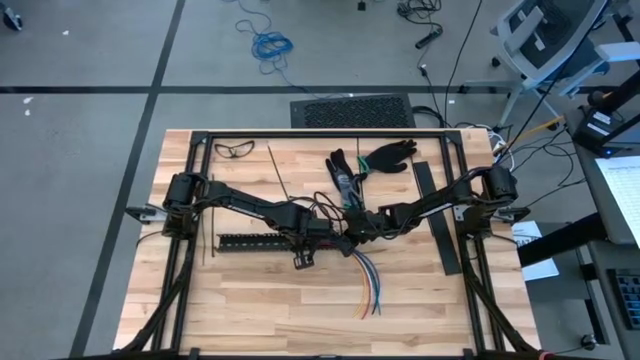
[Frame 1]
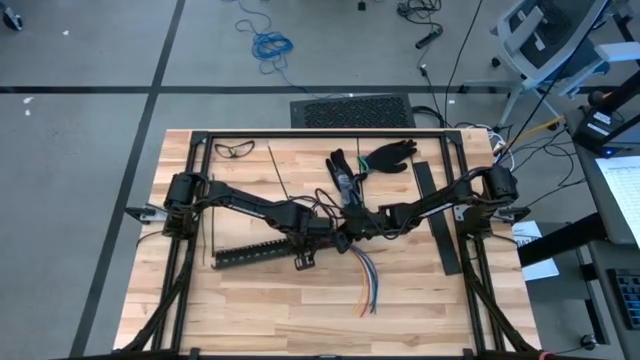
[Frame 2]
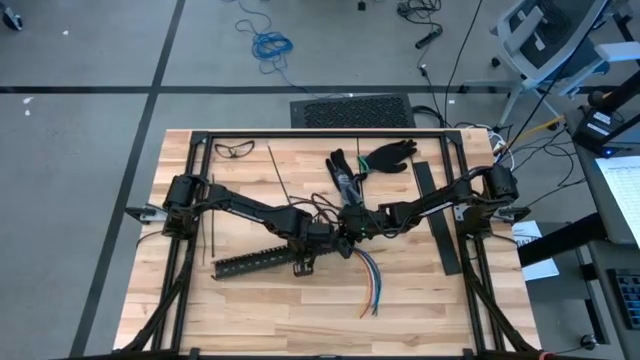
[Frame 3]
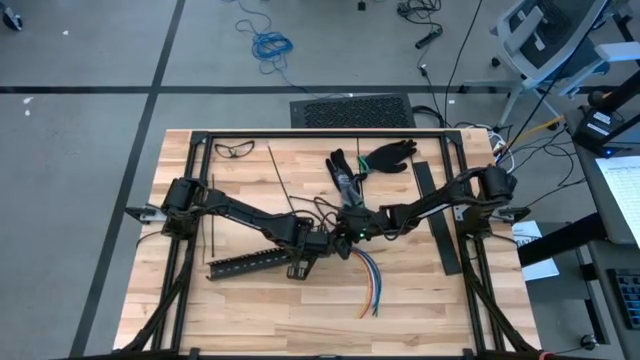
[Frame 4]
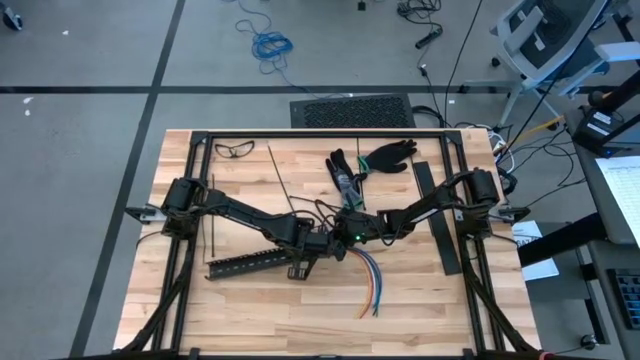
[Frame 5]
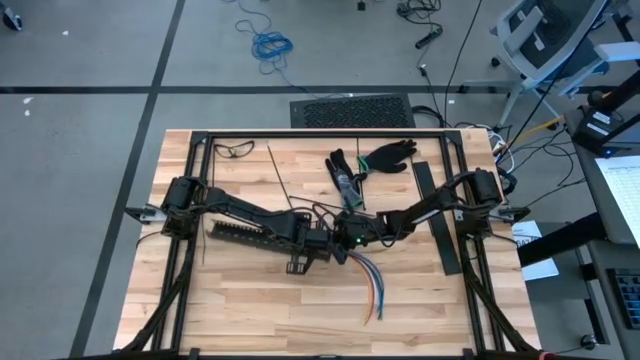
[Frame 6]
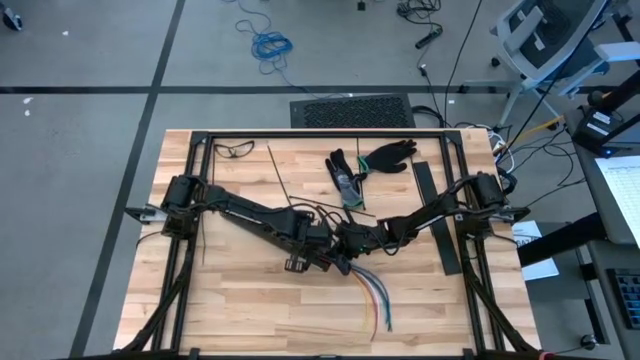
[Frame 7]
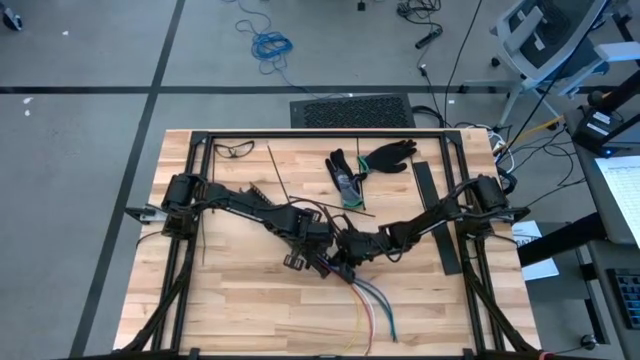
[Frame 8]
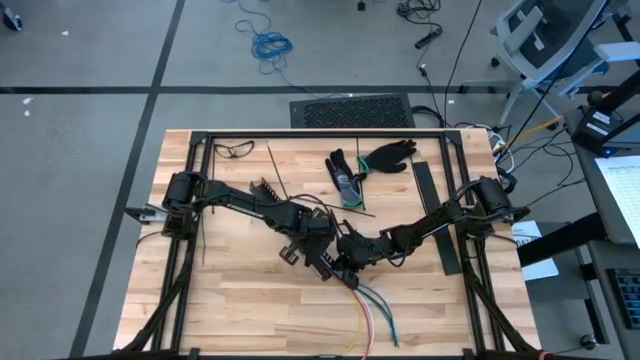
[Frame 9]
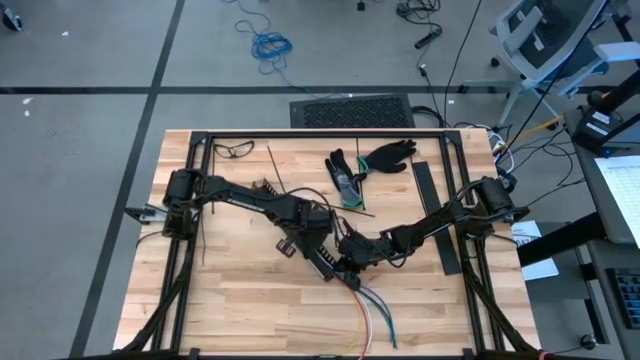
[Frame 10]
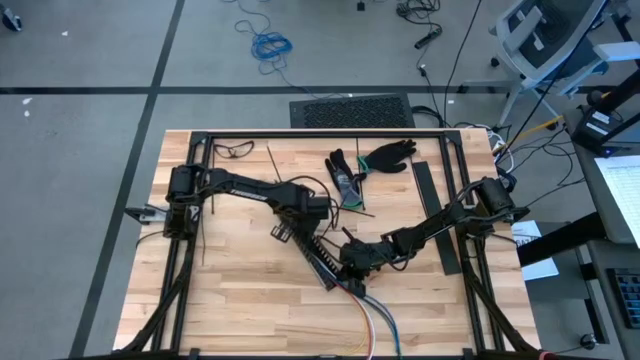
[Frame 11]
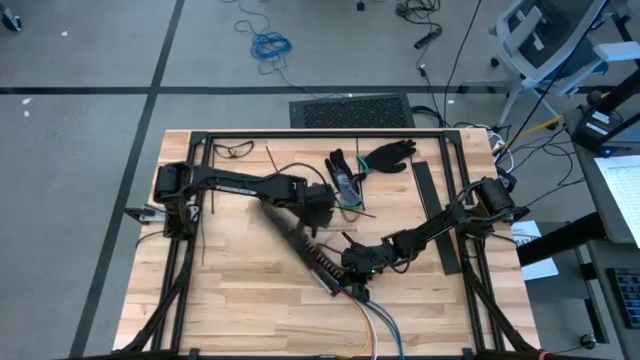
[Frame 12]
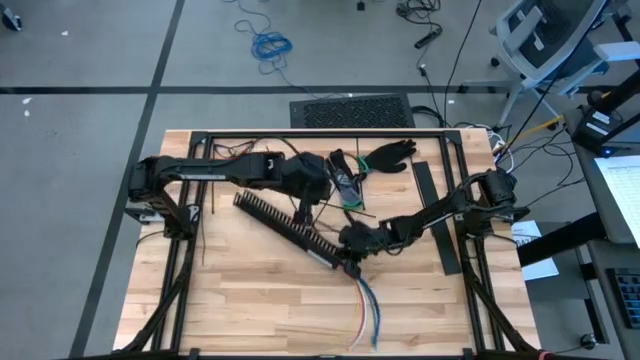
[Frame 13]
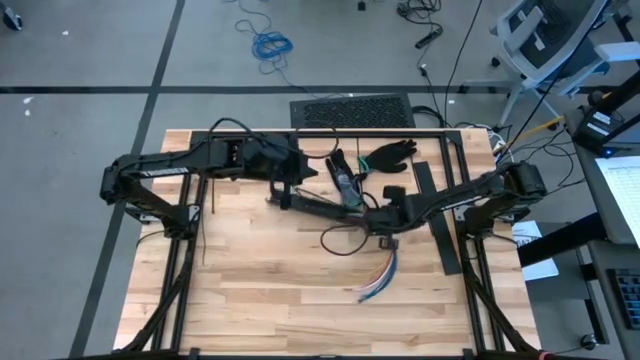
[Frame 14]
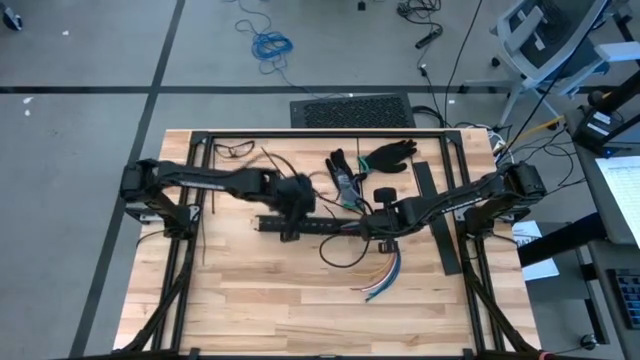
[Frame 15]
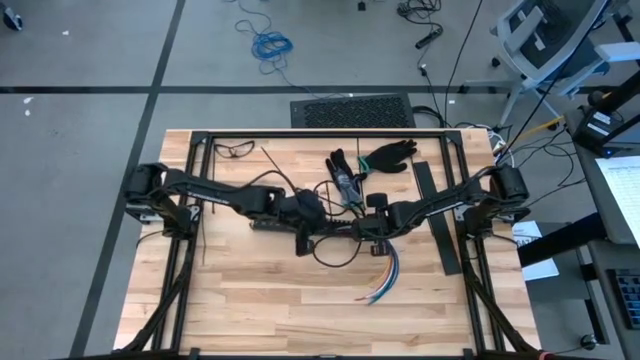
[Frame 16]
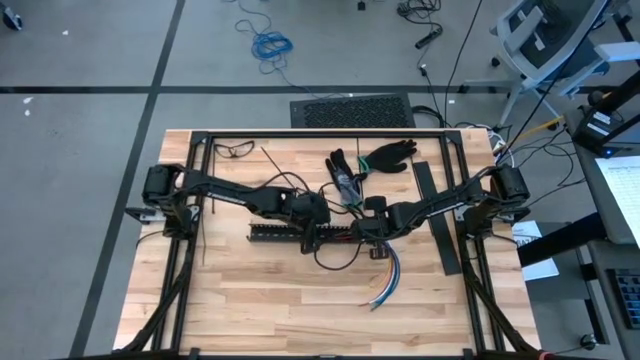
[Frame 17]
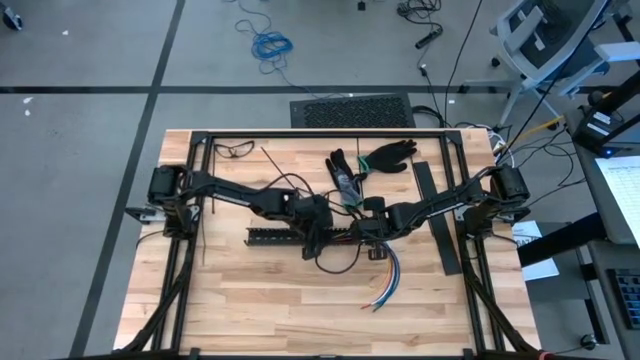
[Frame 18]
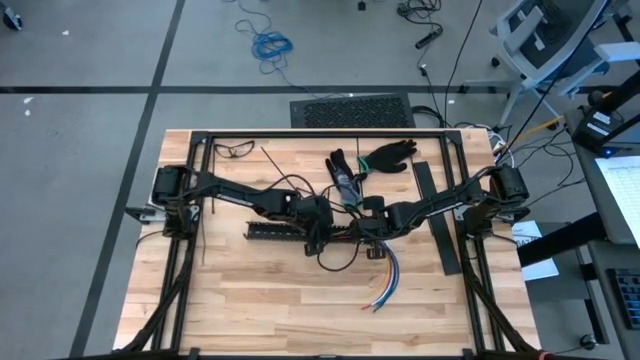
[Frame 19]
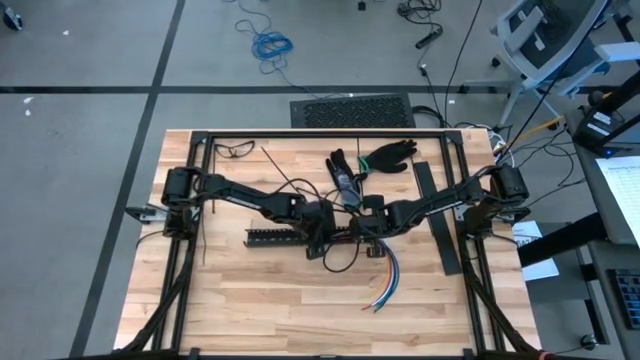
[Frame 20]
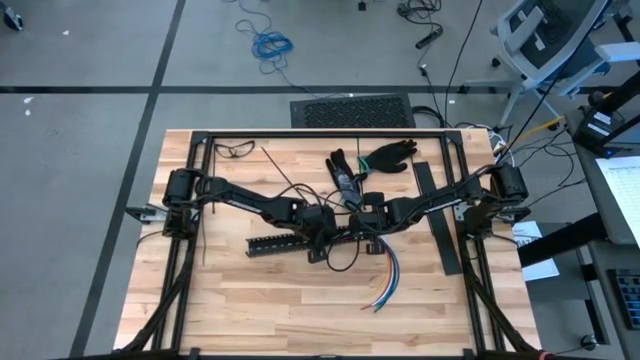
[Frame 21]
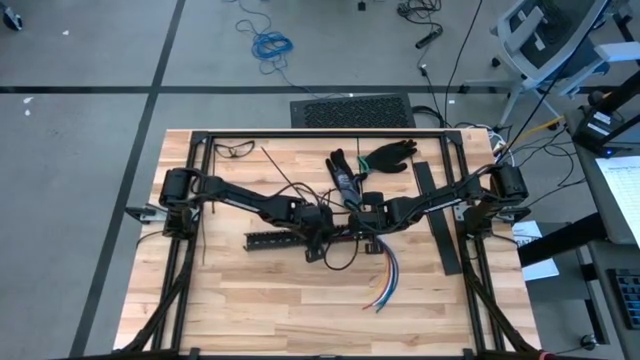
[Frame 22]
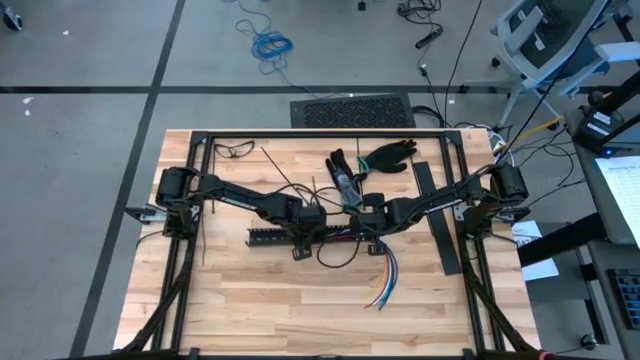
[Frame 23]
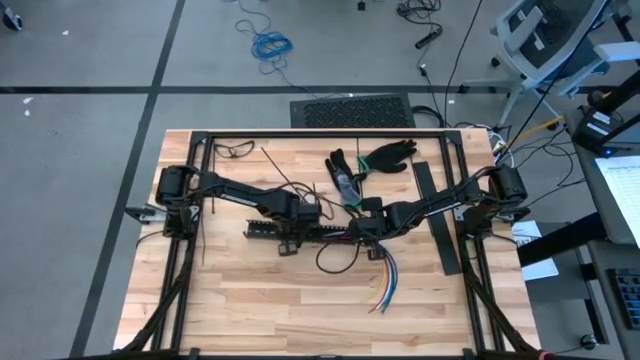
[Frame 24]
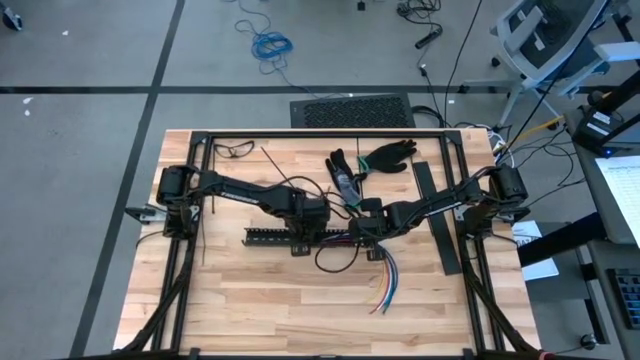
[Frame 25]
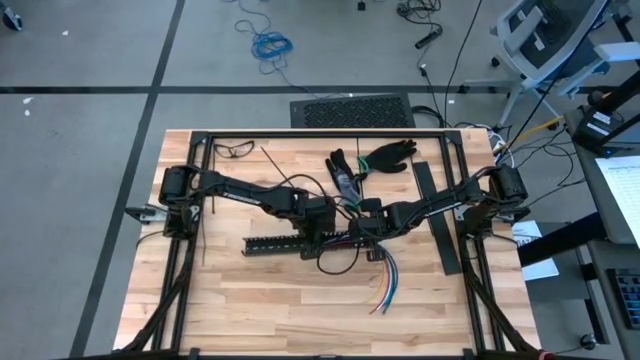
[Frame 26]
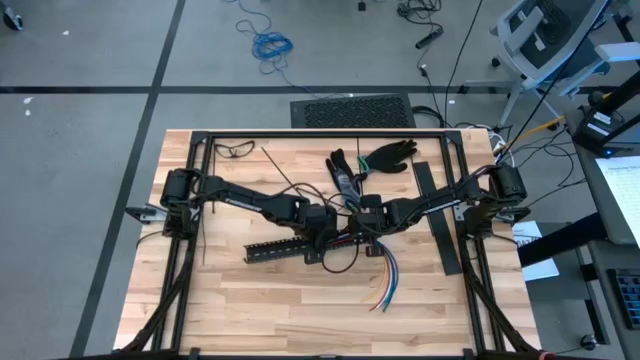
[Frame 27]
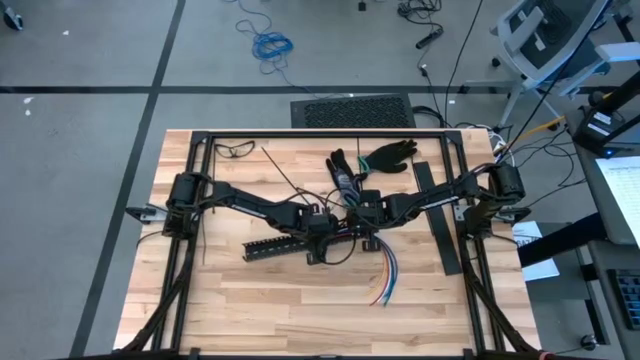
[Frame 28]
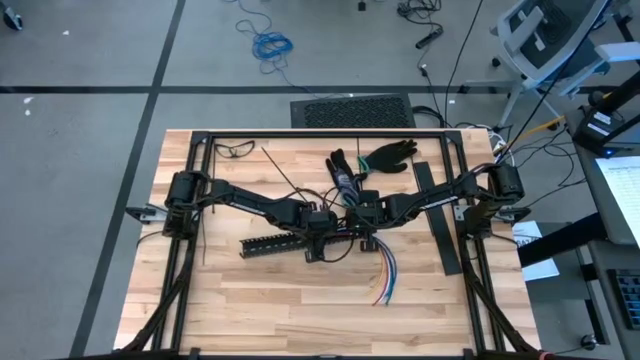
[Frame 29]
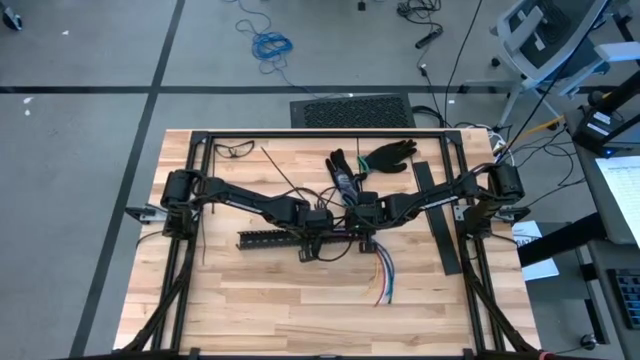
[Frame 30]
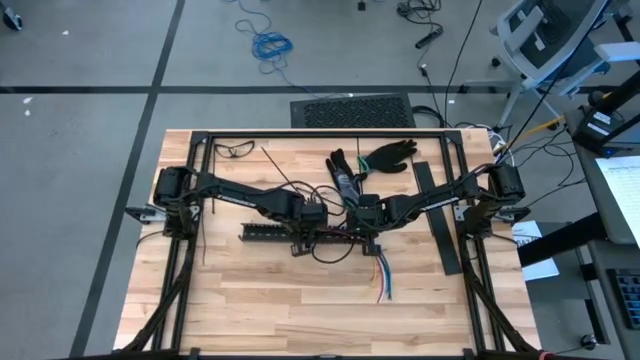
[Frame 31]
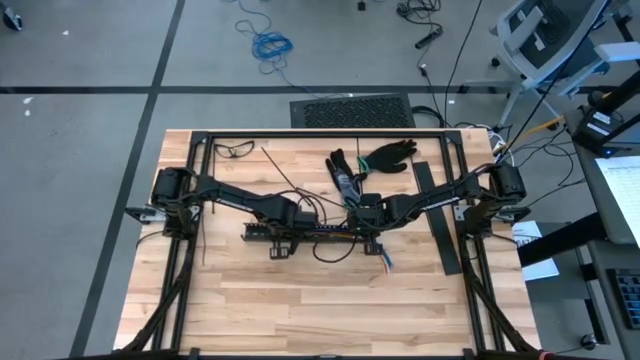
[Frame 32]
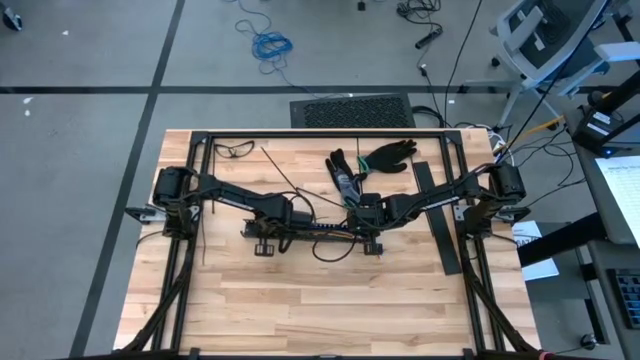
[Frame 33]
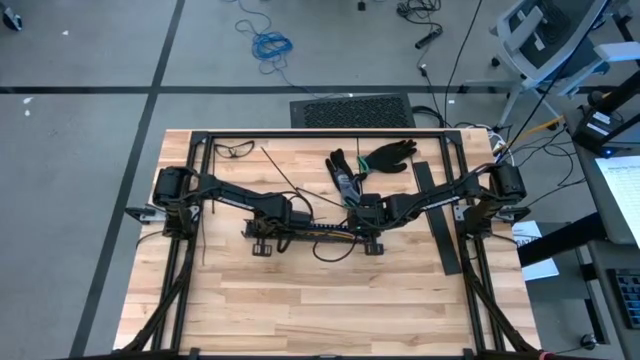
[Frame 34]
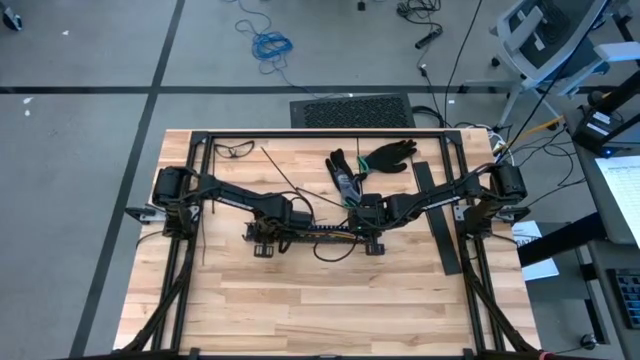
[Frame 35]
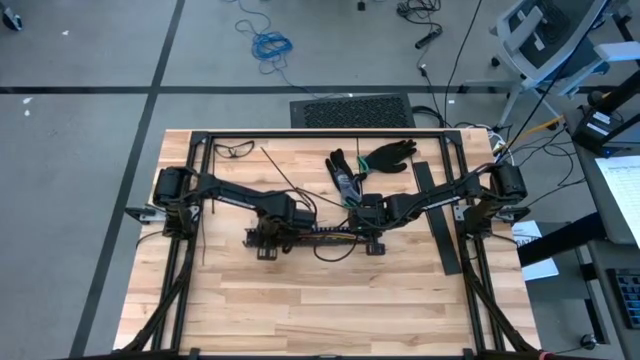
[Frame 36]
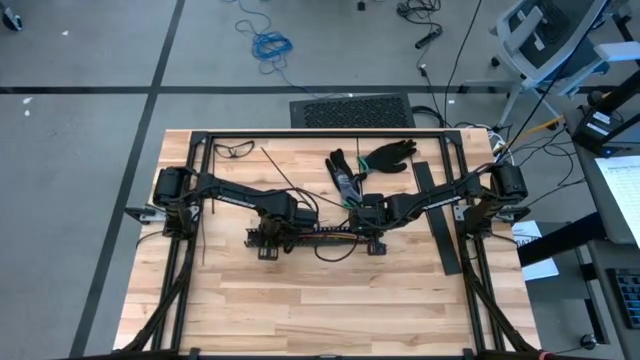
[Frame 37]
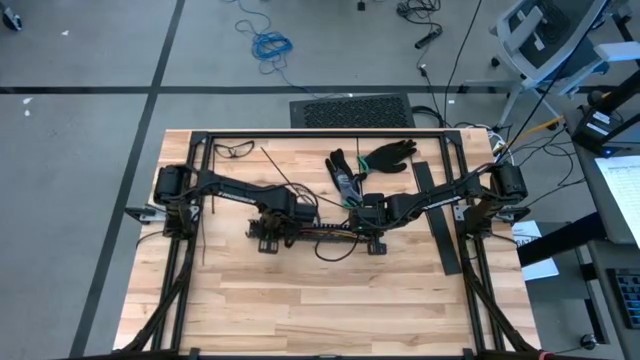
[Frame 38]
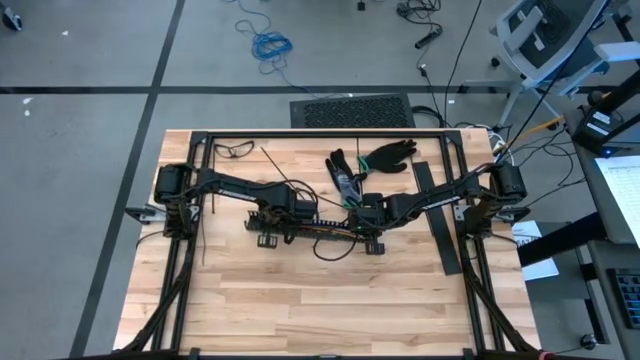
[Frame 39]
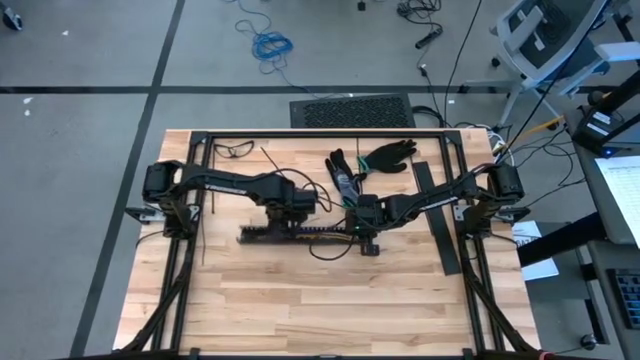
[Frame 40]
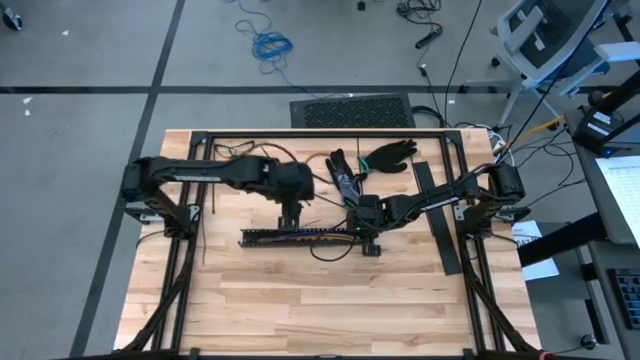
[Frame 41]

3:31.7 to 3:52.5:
Task: Ziptie cables
Put the zip tied cable wires into the black cable duct
